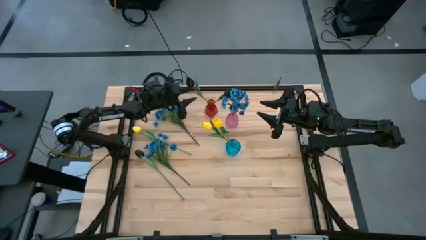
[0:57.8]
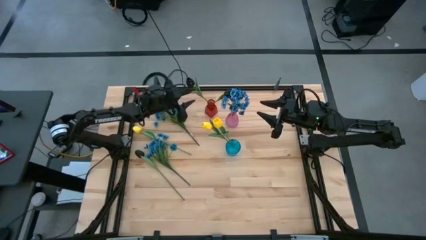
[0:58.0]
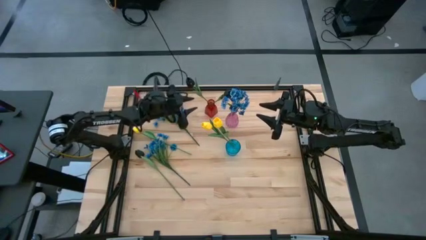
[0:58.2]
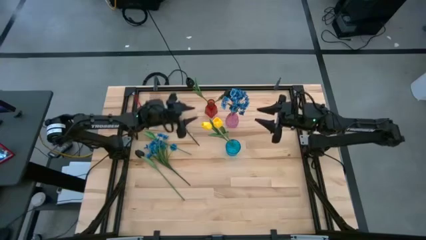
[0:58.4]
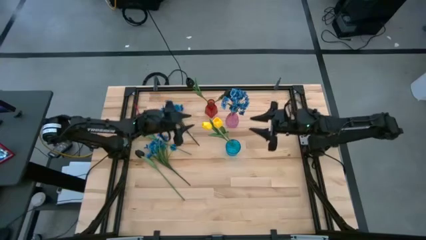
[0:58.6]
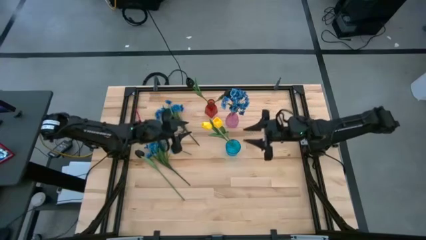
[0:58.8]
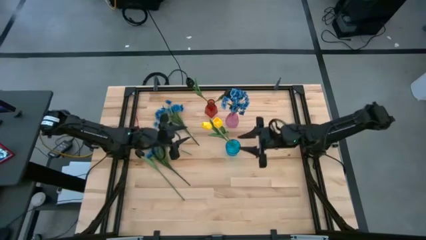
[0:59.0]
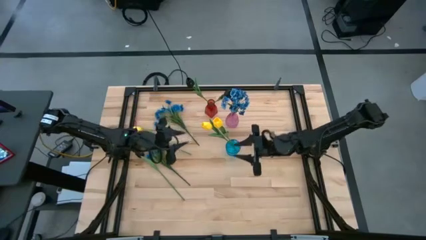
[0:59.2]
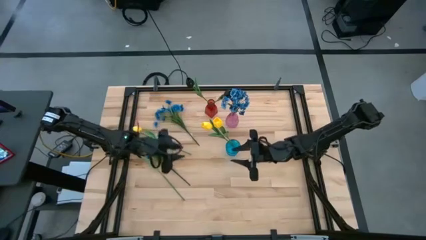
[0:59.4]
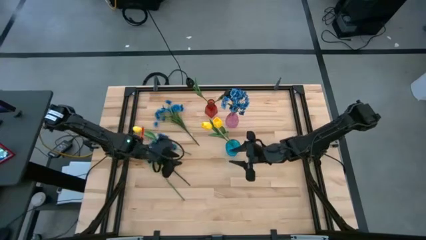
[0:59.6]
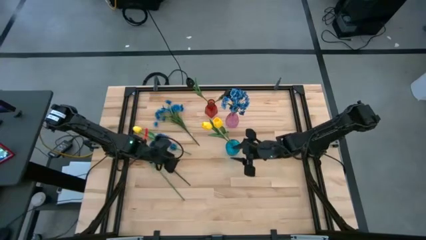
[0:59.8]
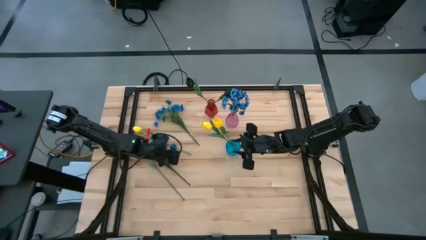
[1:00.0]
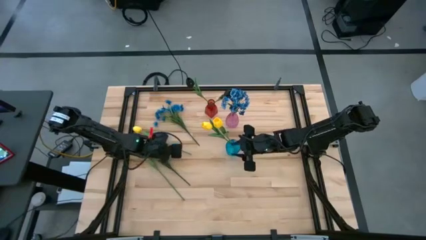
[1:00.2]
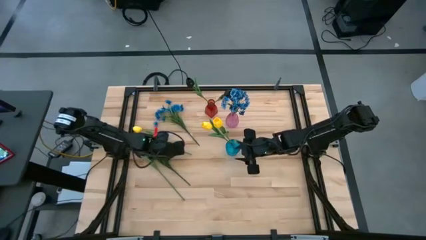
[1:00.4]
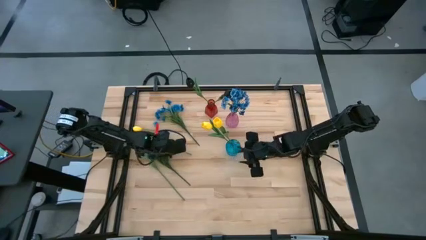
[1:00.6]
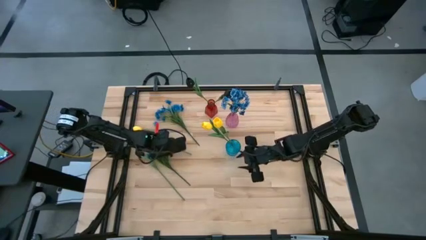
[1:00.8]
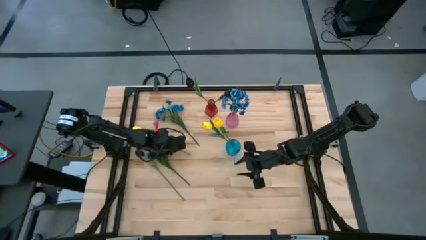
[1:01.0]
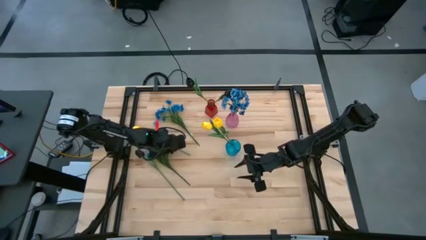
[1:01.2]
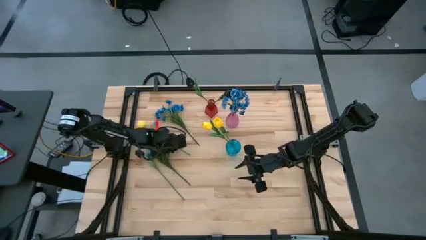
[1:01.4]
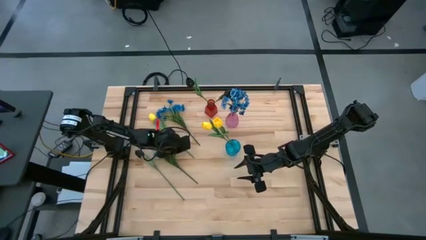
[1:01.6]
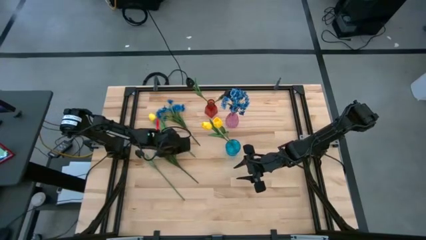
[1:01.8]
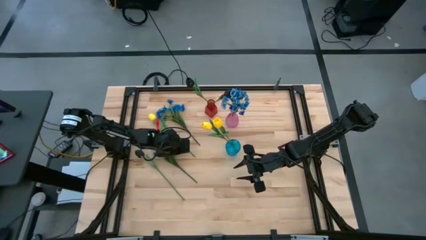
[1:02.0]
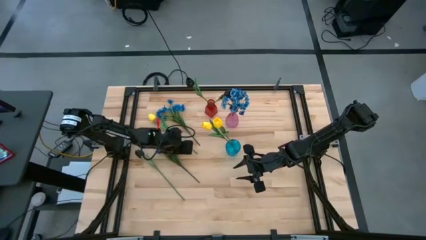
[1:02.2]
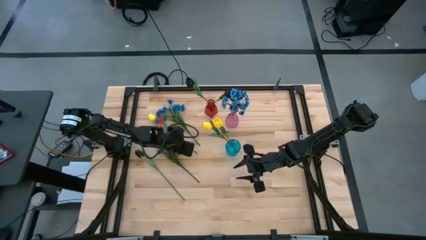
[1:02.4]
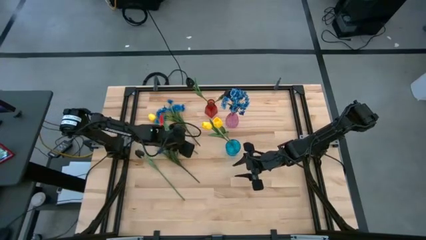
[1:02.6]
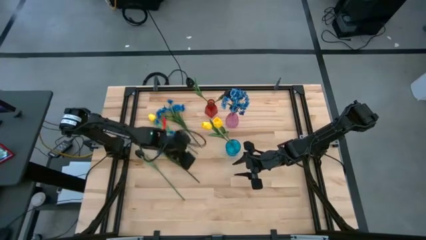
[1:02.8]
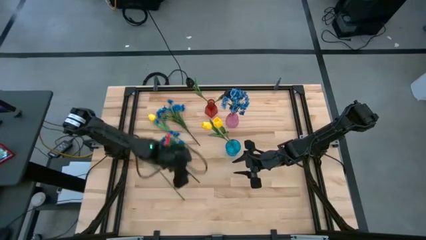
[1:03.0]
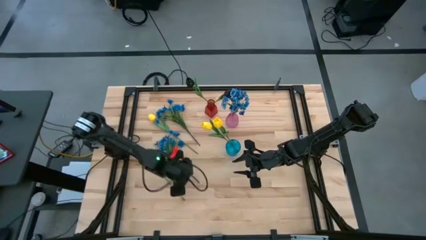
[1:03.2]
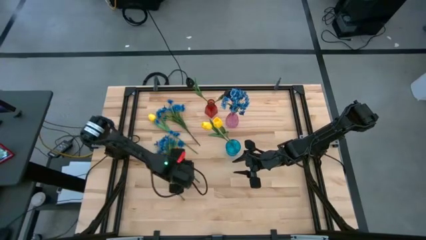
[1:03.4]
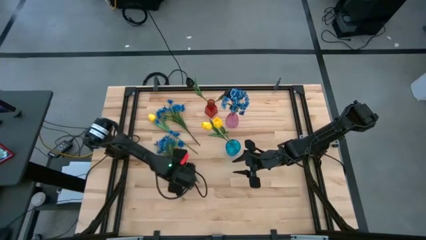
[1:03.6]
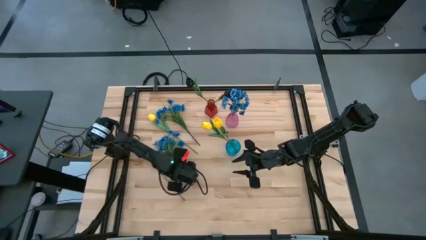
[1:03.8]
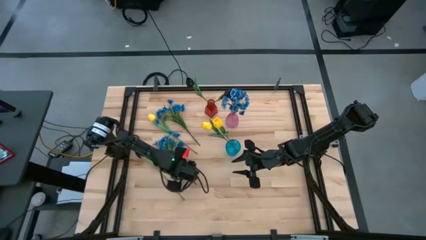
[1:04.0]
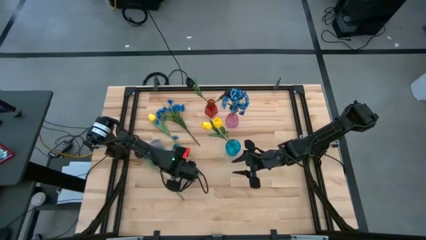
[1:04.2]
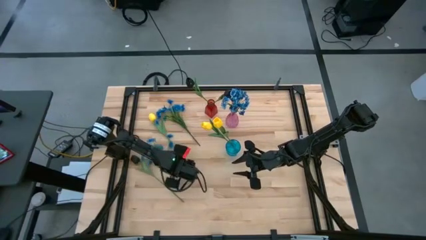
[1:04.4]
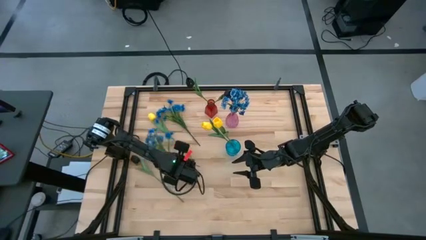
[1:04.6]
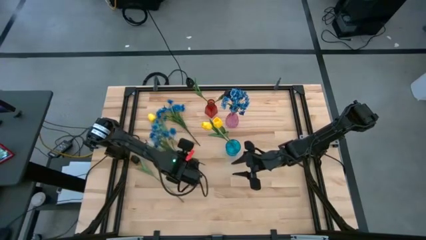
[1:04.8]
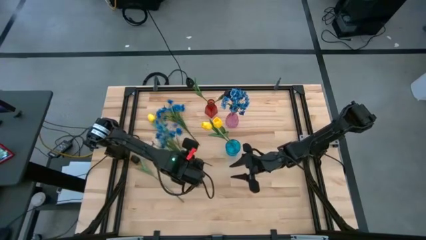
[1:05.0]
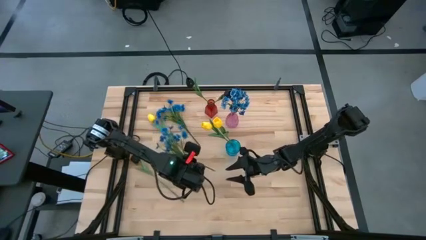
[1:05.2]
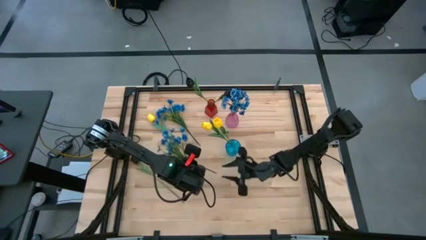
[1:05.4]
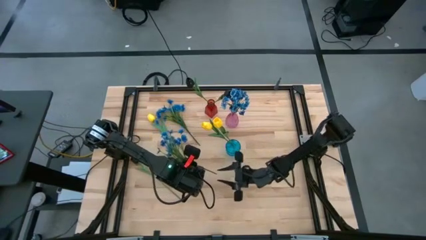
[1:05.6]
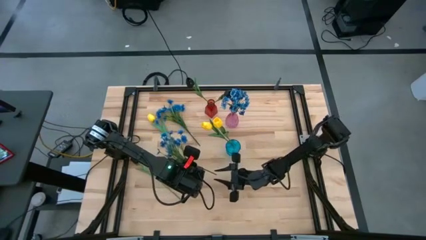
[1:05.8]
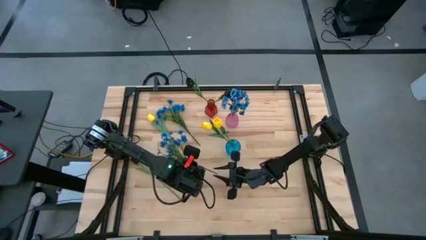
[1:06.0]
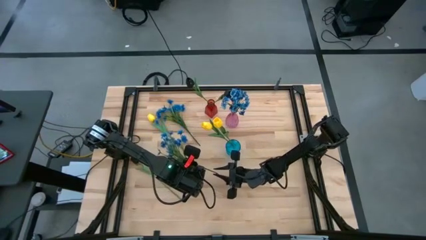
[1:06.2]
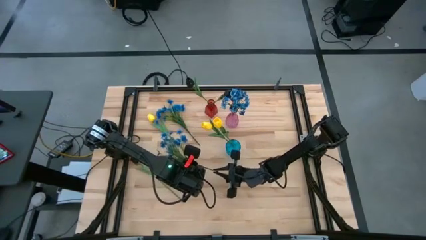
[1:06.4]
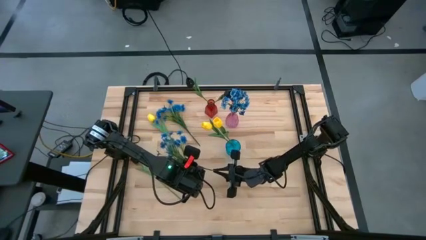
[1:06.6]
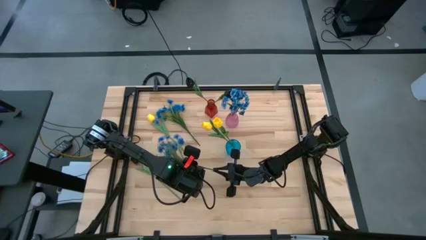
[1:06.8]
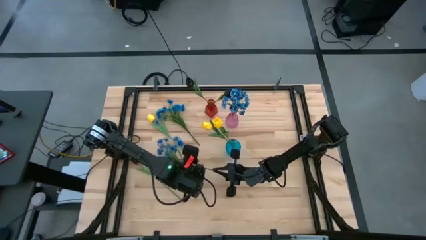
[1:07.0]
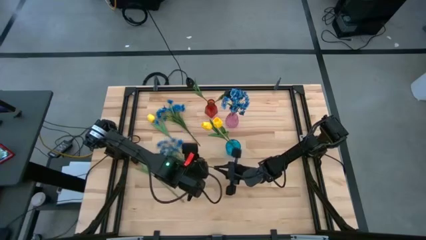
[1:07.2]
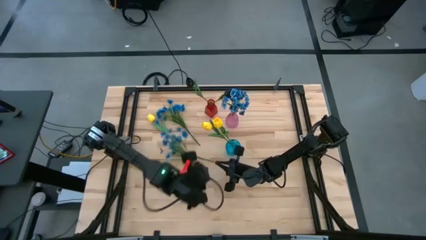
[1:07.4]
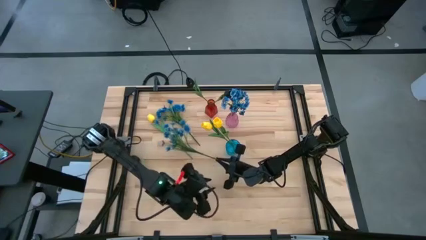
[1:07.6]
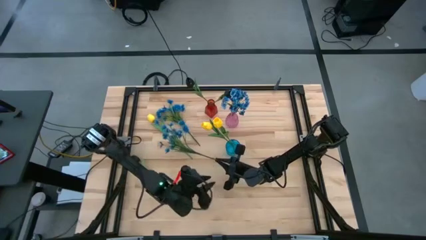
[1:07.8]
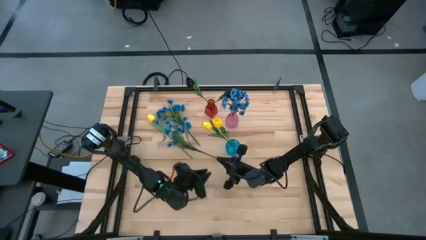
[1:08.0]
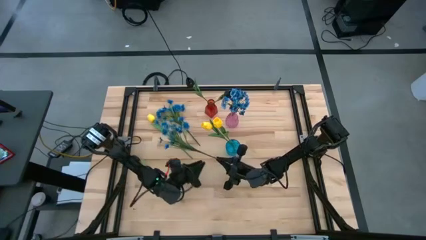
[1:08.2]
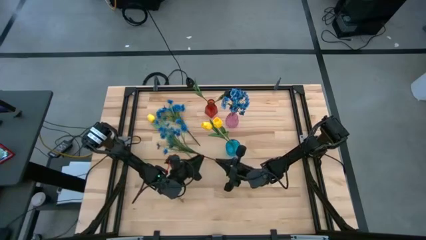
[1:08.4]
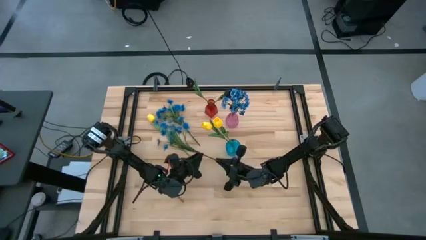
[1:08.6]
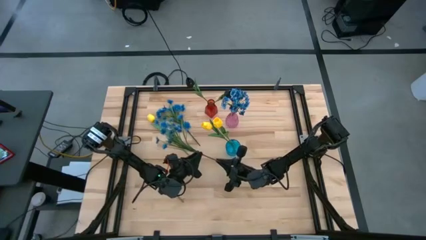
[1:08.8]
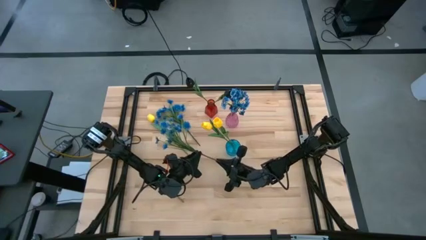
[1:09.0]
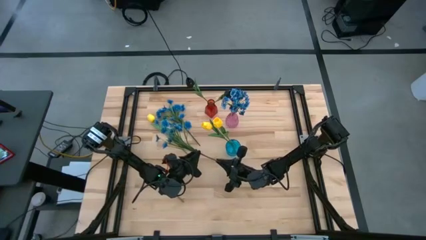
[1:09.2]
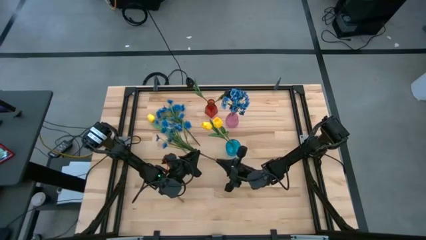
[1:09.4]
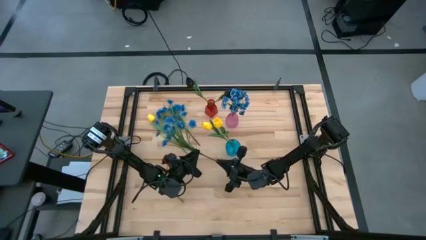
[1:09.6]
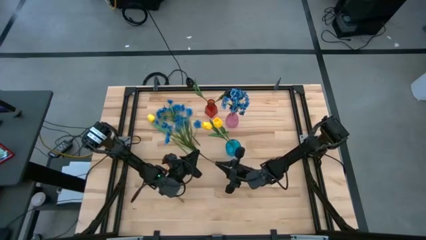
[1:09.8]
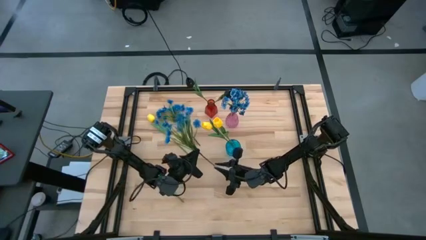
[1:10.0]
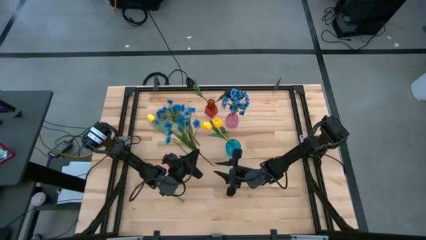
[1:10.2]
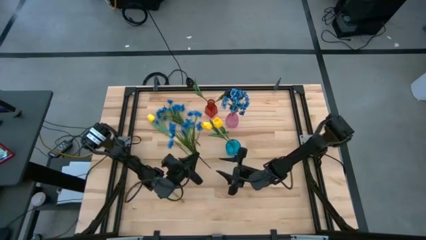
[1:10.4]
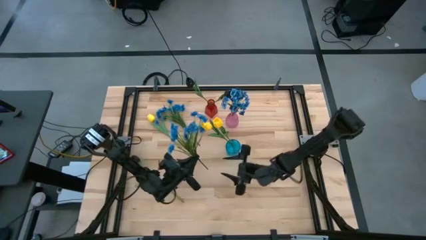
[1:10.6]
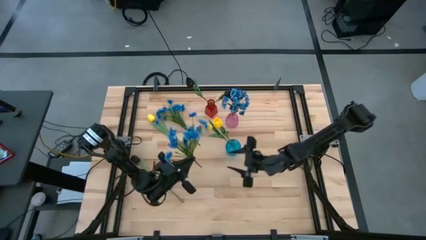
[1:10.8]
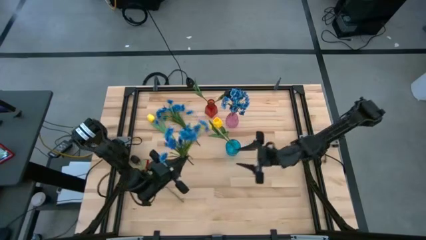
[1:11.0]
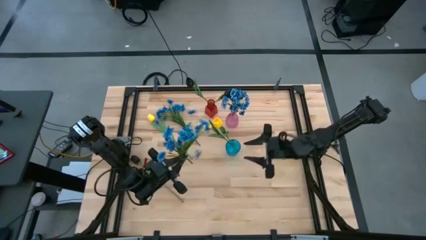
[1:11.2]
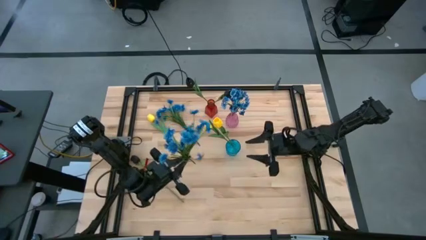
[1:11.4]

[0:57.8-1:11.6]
Task: Sort flowers into vase by color
Put the blue flowers into the pink vase

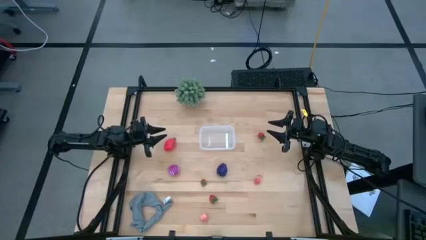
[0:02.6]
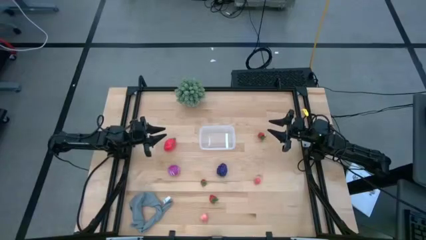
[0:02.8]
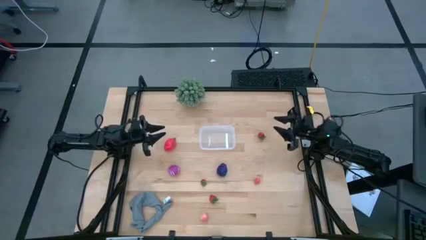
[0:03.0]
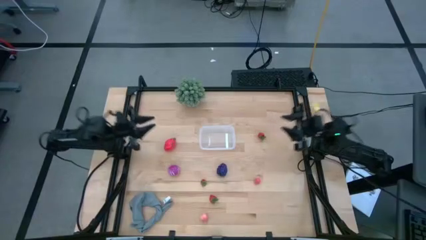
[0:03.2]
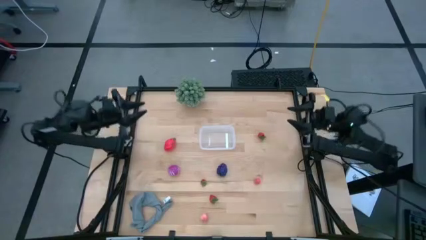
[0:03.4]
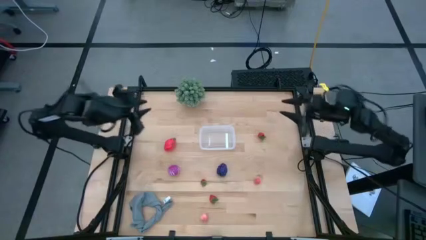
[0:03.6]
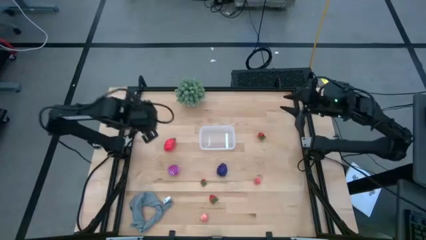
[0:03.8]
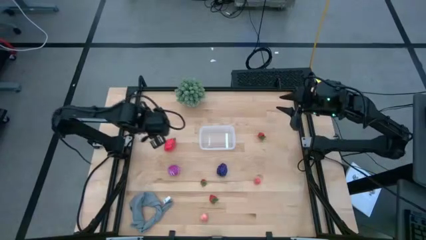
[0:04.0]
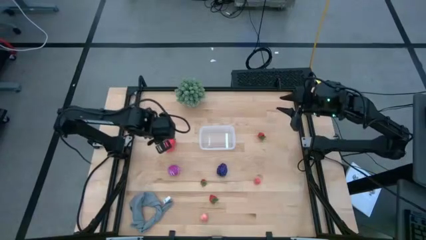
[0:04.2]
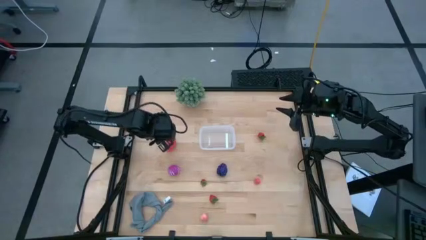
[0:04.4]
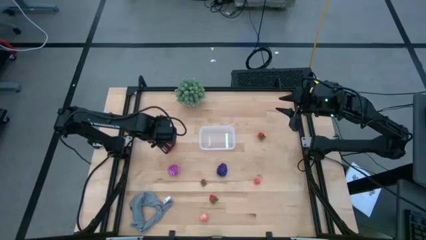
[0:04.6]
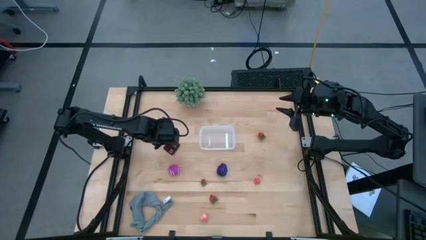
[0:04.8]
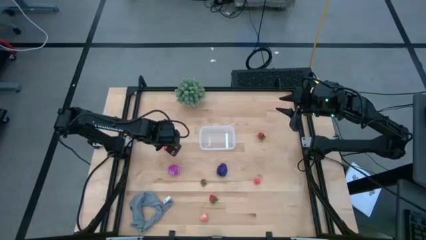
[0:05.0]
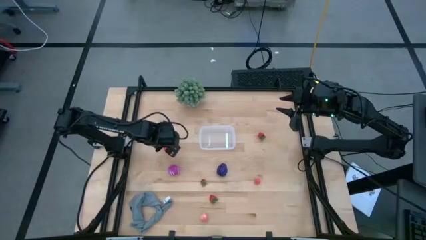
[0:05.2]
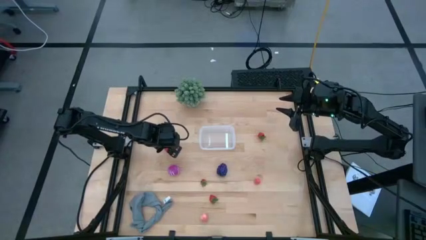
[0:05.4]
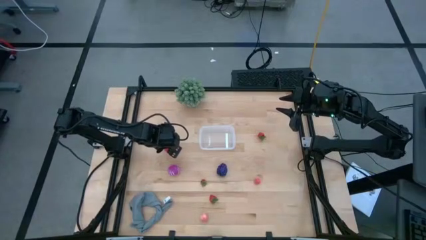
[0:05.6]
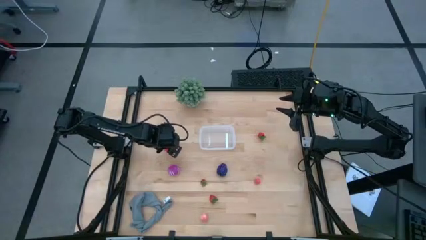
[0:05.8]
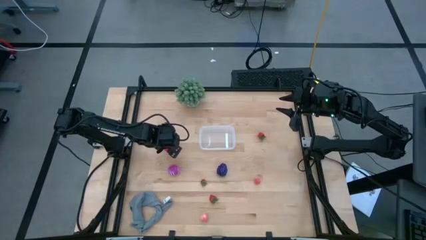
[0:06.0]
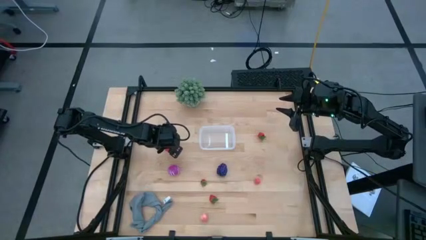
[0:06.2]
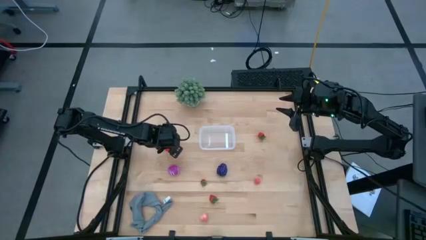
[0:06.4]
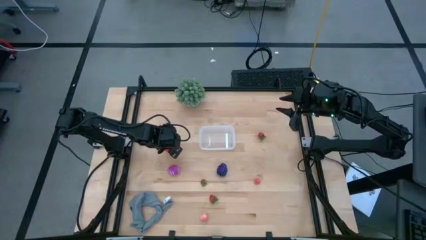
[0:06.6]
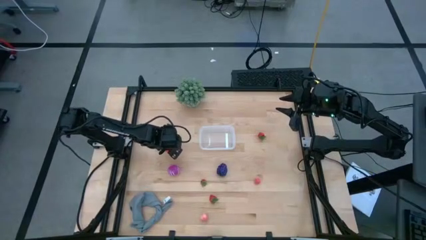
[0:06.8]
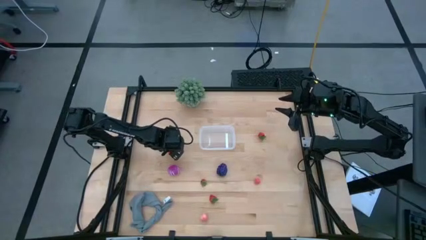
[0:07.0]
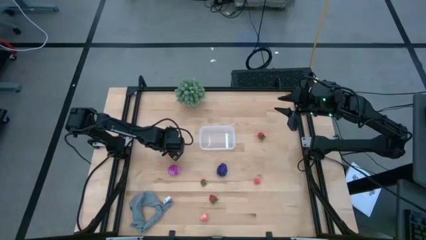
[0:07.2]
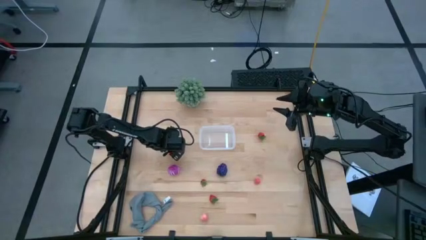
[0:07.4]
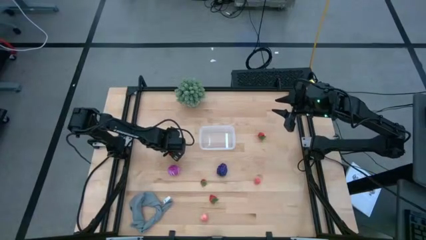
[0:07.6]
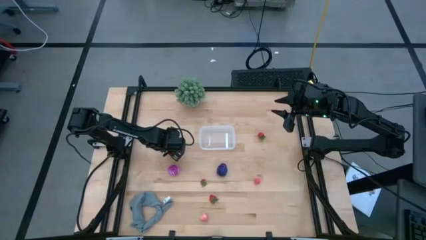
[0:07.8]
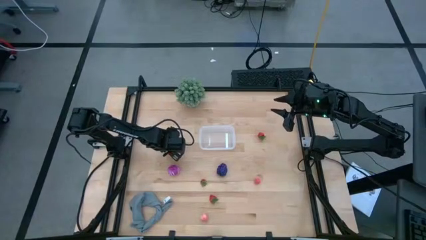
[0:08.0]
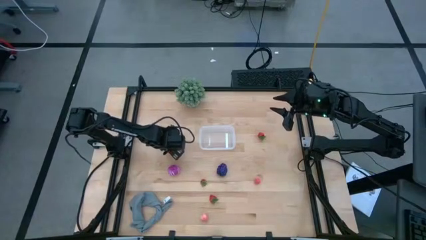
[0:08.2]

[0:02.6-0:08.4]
Task: Pick and placing Produce into tupperware
Put the dragon fruit into the bin
